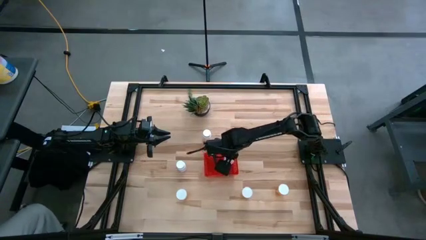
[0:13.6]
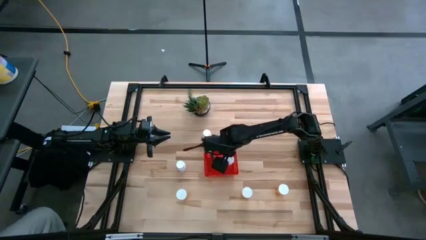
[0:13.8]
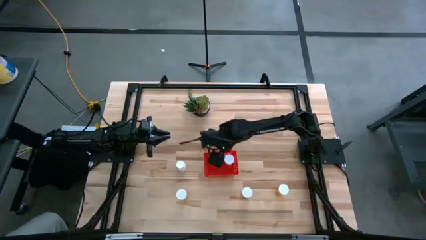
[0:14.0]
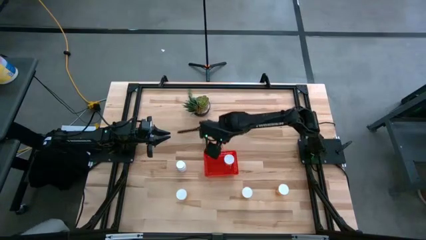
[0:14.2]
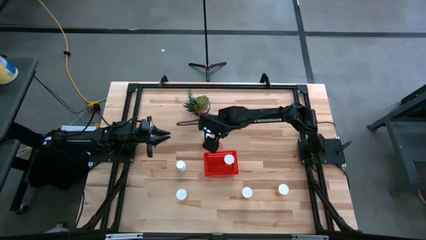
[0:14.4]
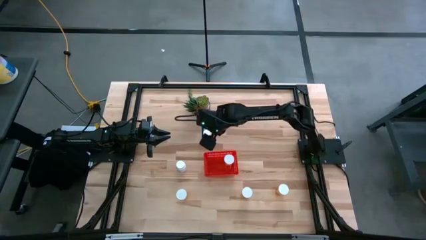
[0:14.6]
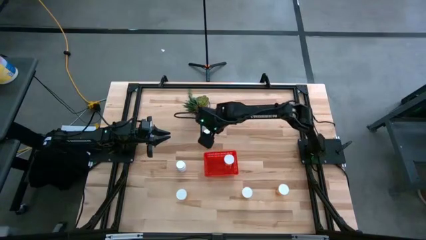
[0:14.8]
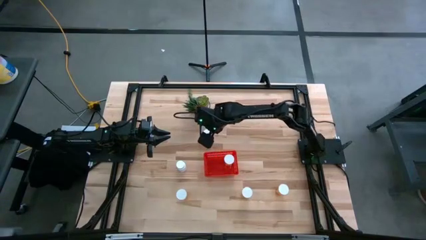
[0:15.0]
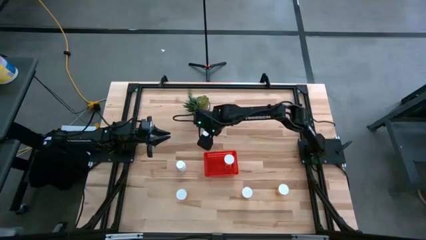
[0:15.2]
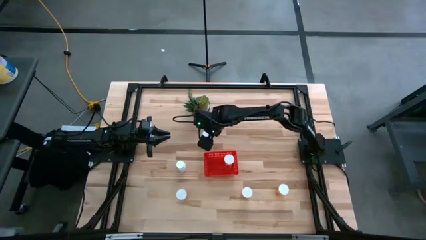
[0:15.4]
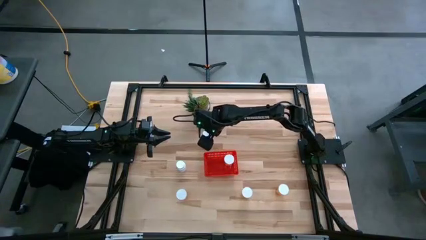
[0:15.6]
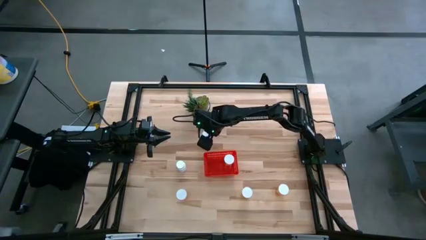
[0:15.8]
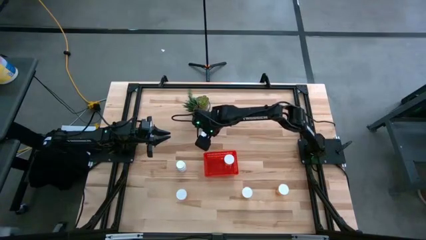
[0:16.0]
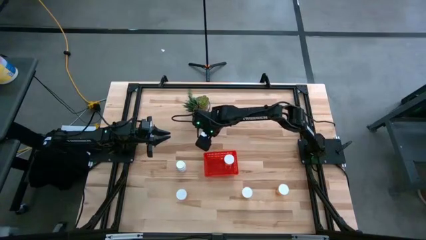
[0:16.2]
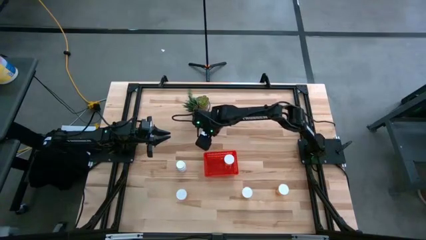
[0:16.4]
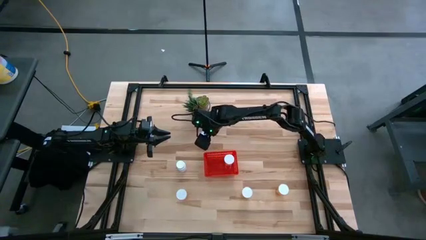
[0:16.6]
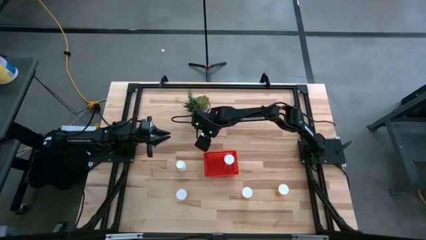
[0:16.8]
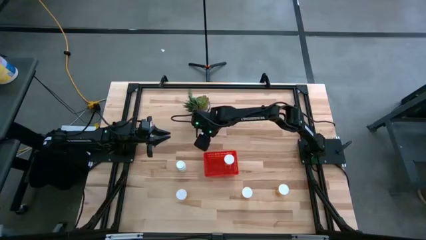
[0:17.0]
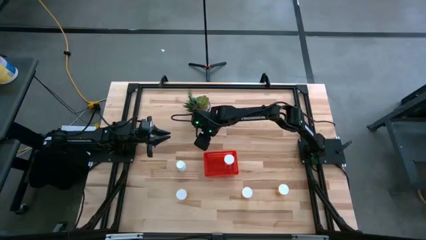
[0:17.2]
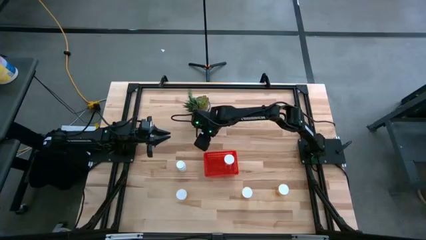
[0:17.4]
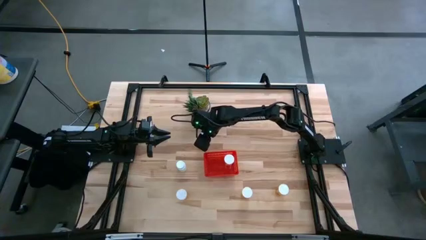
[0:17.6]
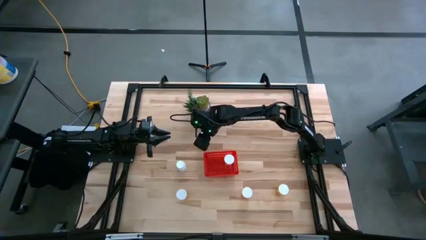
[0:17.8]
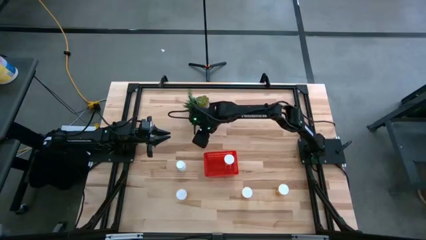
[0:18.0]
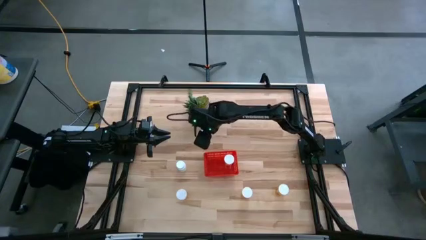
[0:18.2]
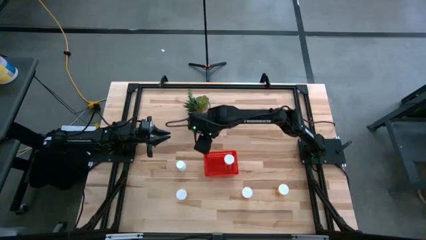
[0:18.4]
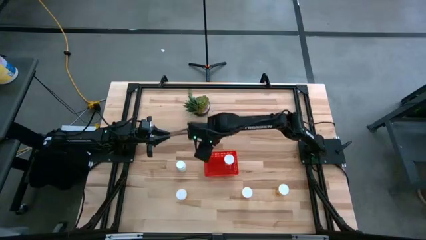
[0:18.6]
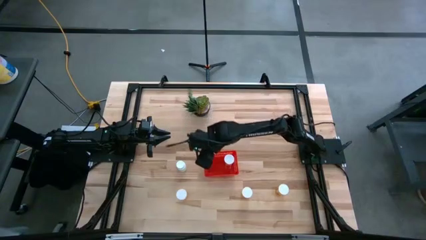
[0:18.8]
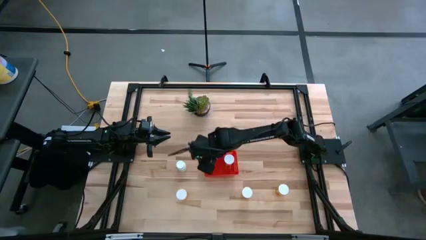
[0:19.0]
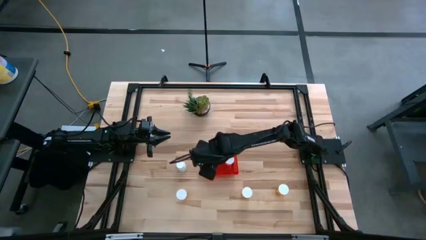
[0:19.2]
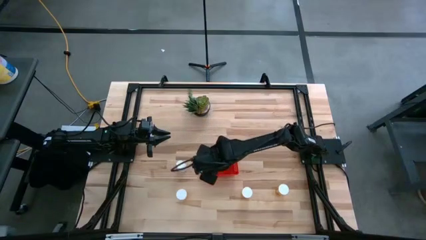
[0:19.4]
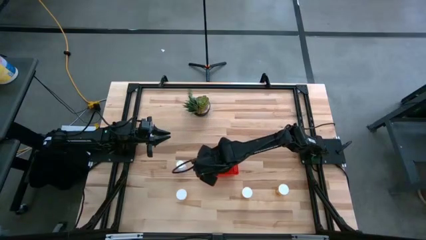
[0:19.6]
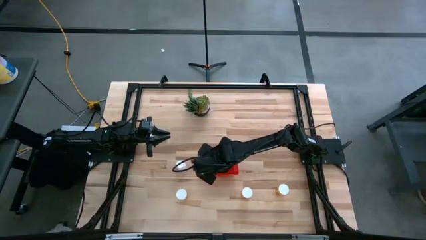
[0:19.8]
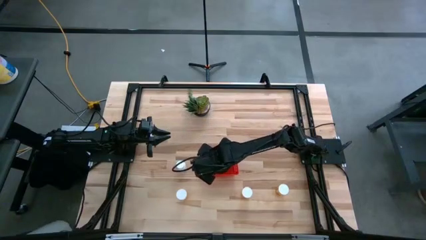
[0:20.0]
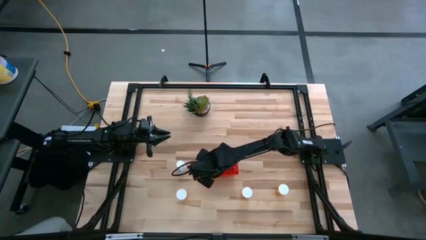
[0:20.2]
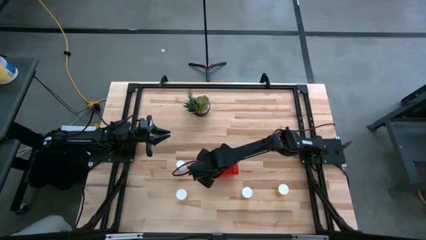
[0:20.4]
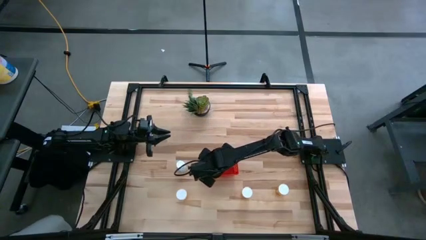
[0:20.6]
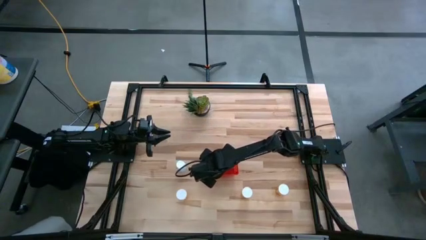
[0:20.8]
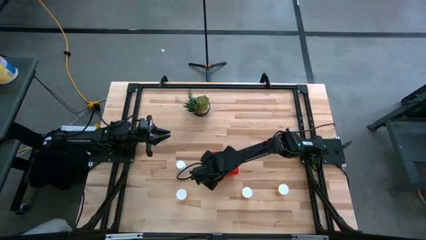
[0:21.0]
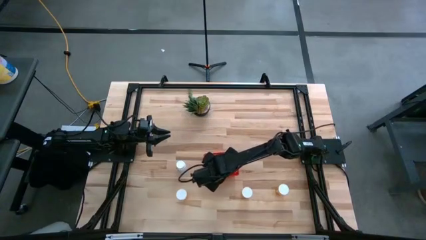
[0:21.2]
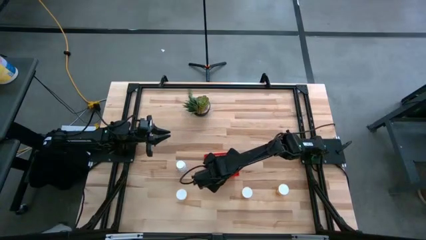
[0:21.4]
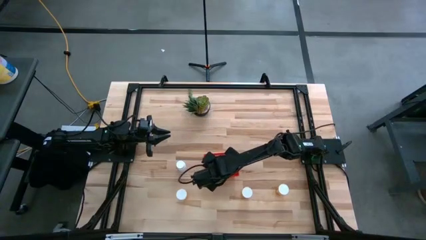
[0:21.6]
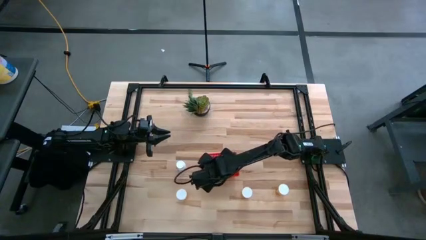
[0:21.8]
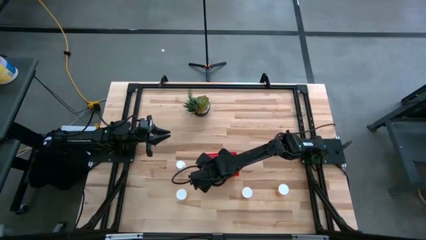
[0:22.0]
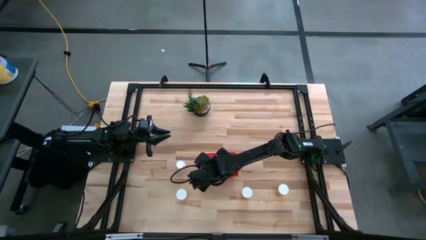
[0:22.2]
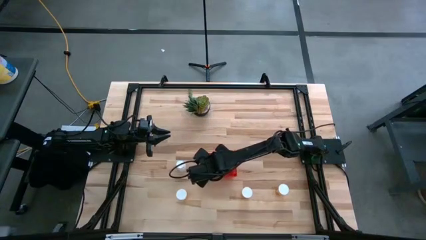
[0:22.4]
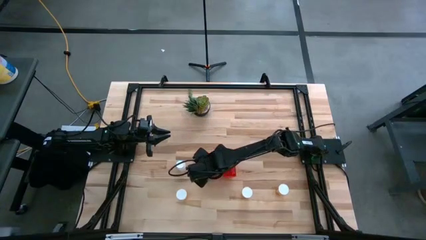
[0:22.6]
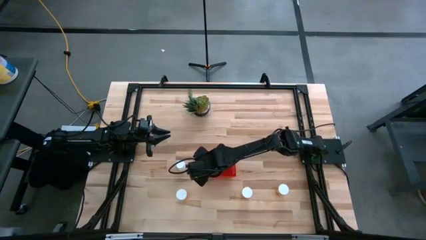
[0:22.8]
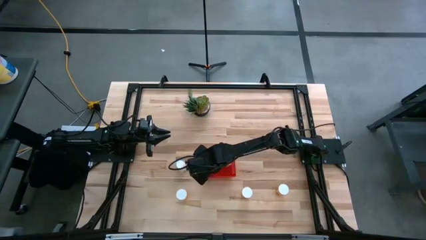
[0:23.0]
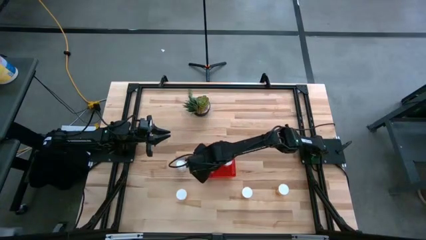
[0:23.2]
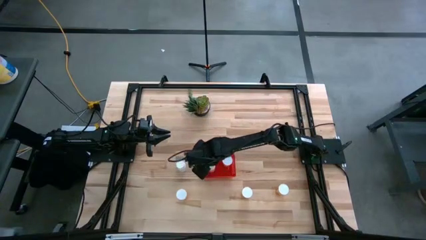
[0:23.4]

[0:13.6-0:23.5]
Task: Pick and place pill bottles into a basket
Put the white pill bottle into the red bin

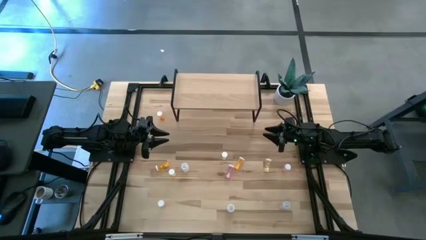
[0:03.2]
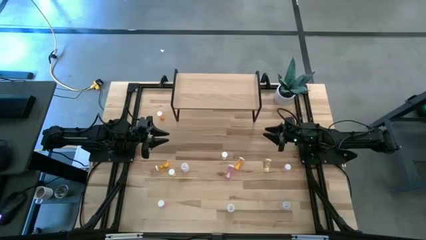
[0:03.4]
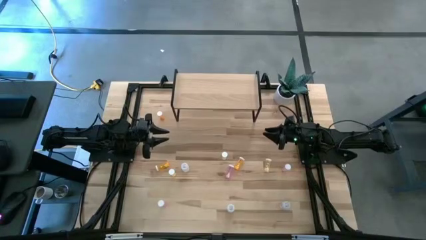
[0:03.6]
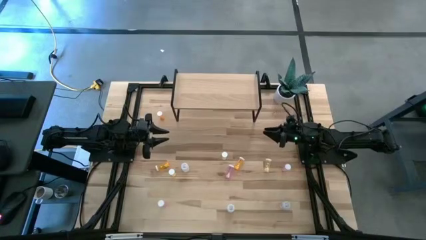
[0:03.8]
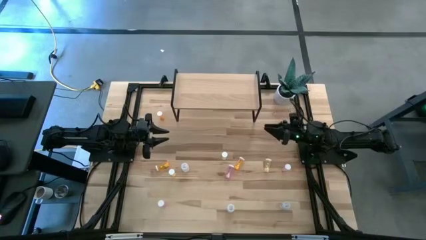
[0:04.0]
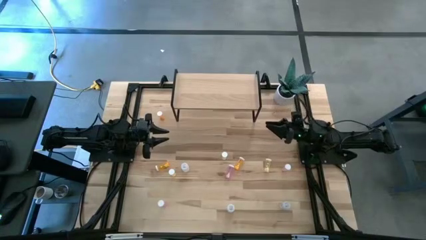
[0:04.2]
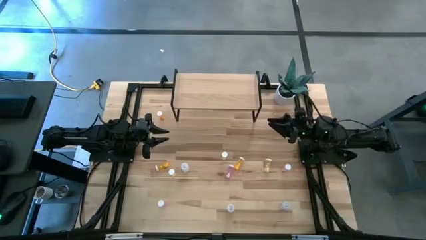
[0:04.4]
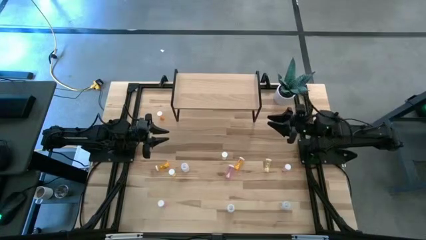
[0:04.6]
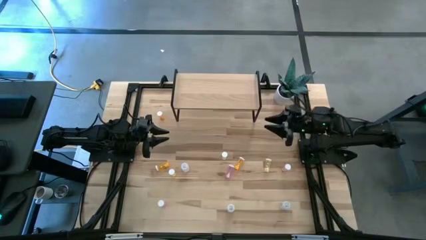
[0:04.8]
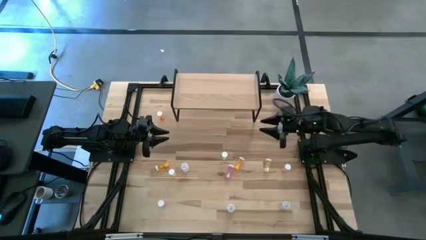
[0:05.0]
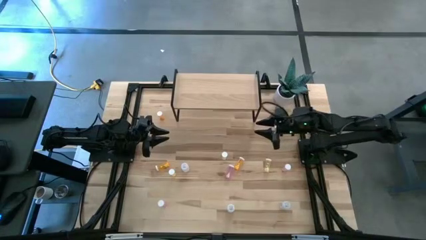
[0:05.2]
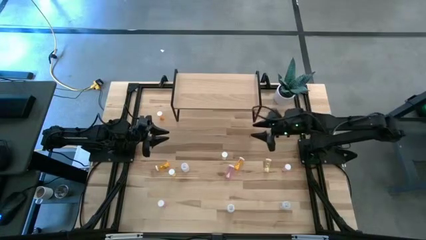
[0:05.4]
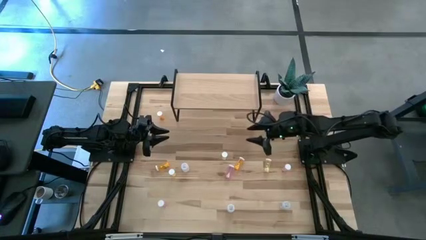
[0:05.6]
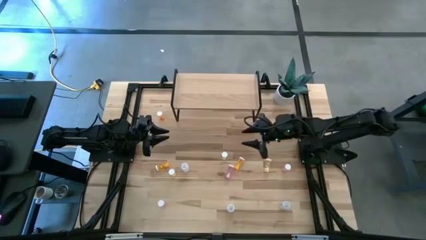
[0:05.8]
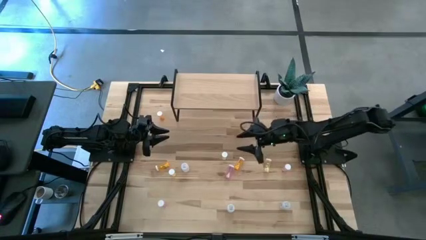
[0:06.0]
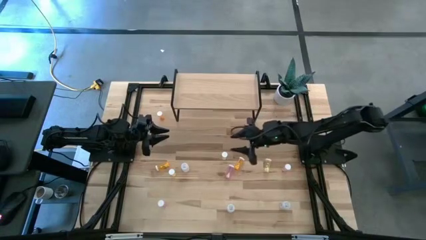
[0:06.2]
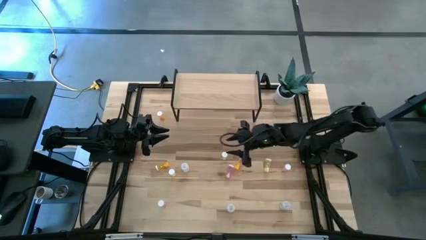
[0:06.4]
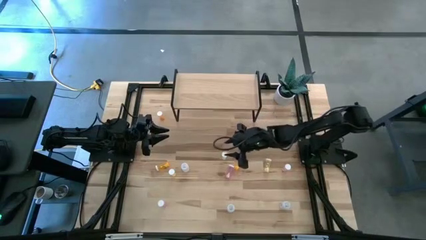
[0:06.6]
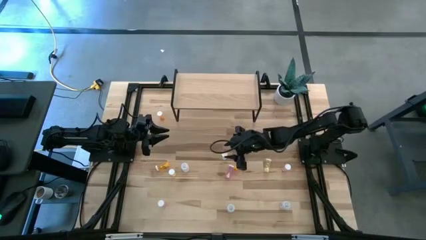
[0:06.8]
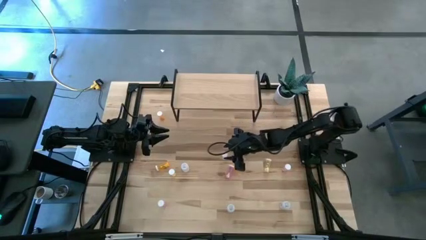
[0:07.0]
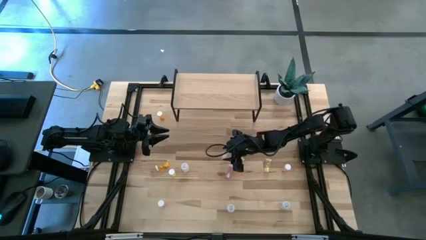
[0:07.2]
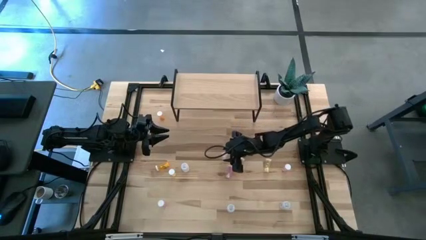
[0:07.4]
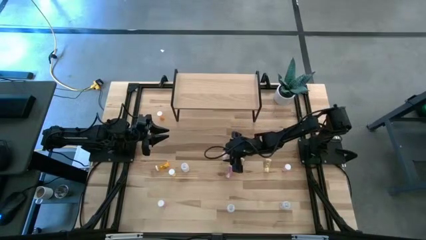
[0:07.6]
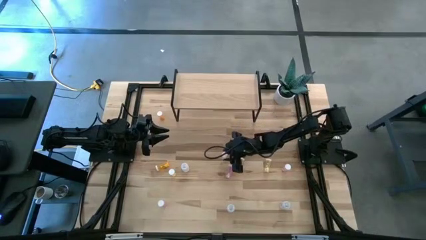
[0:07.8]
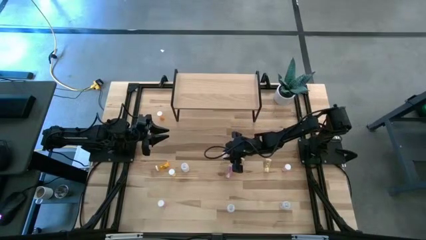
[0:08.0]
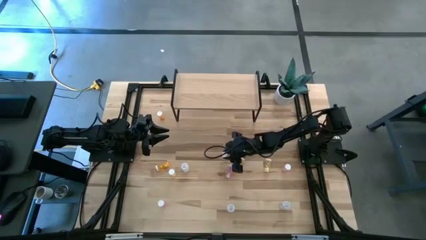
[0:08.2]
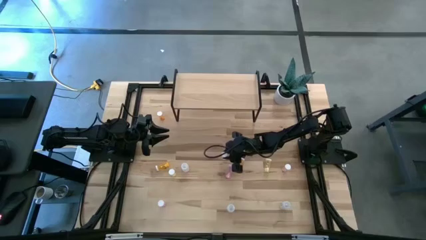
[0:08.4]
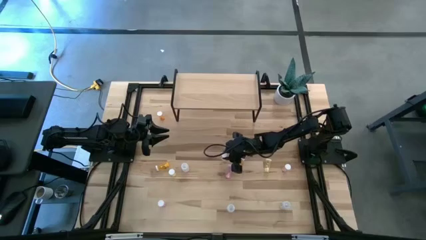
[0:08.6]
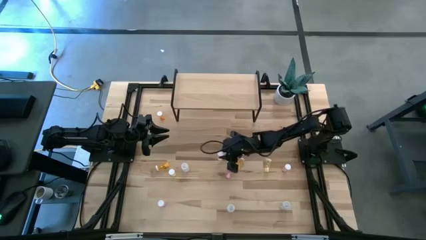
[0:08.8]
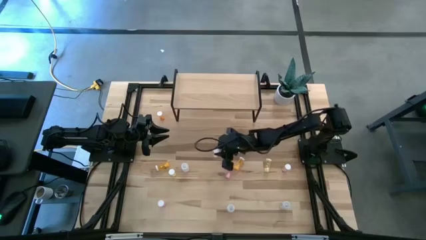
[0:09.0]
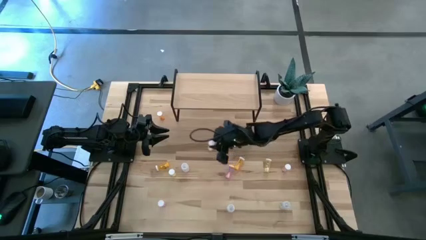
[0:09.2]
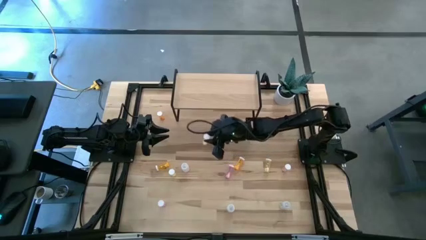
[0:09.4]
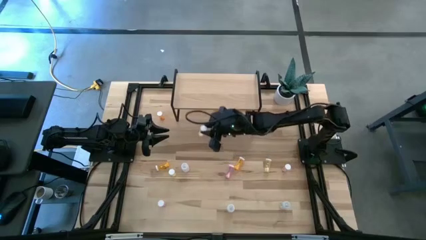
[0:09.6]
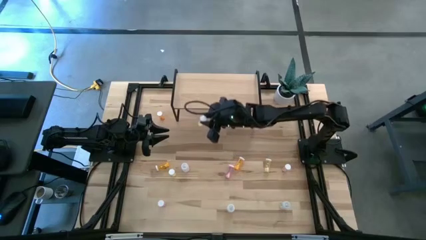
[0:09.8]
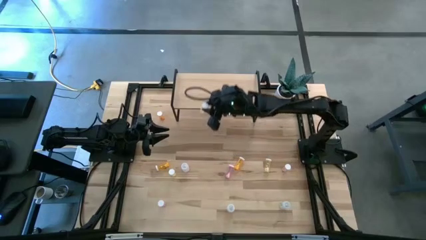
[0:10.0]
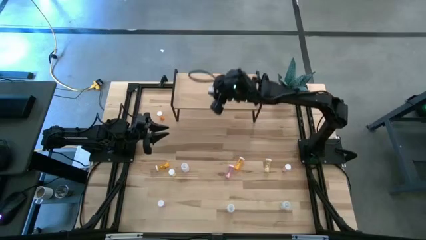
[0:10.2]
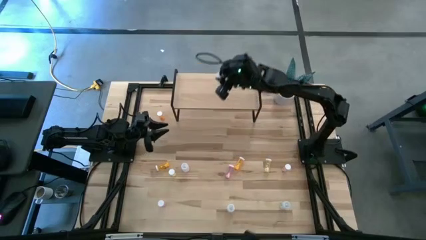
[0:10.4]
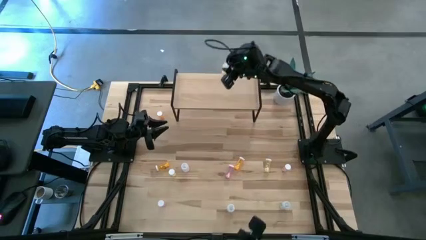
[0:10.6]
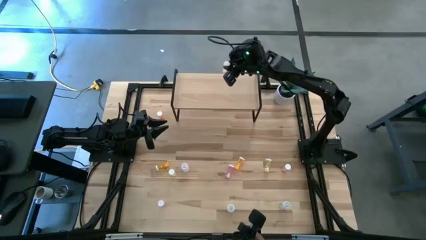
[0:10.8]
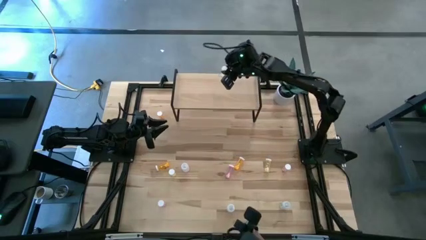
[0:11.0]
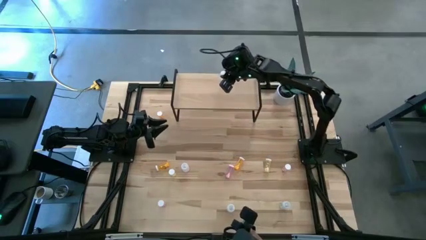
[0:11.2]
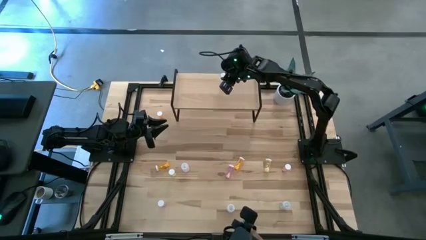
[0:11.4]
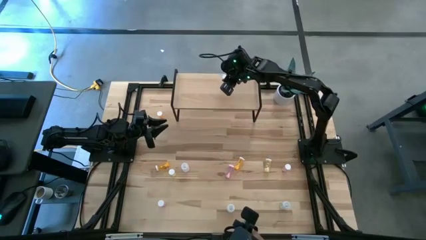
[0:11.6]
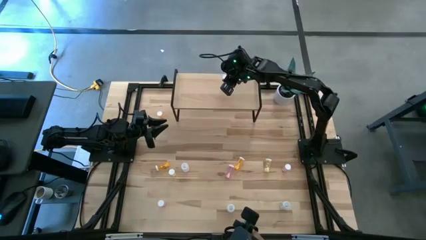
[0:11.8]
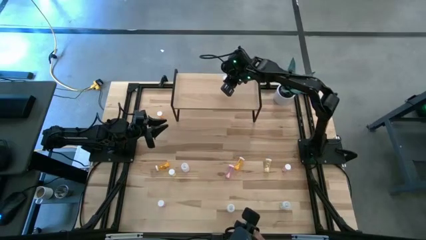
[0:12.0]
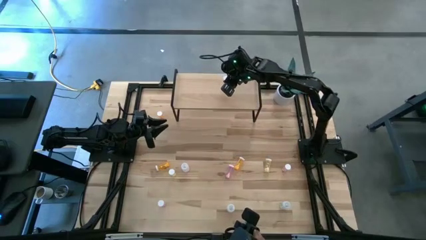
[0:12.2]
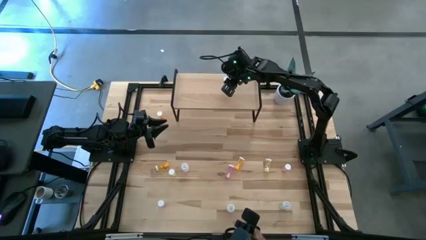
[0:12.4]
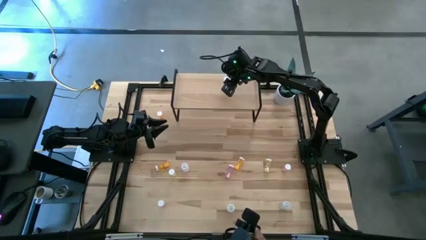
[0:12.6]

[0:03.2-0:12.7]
Task: Pick and place medicine bottles onto shelf by color
Put the center yellow pill bottle on the shelf
